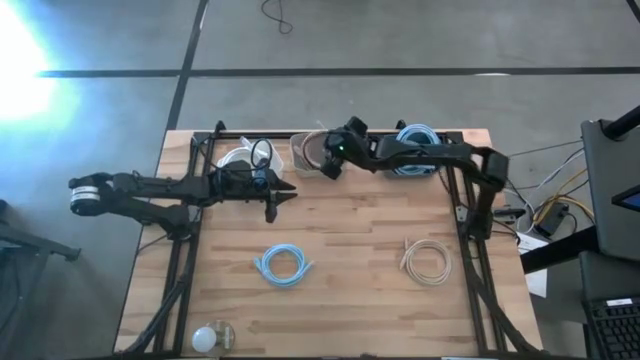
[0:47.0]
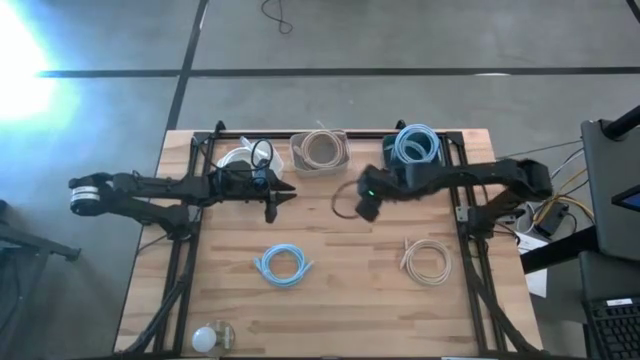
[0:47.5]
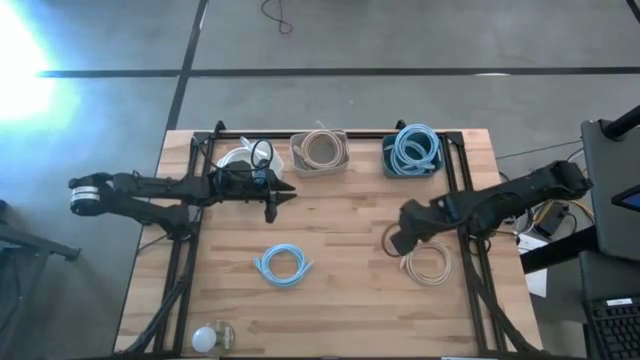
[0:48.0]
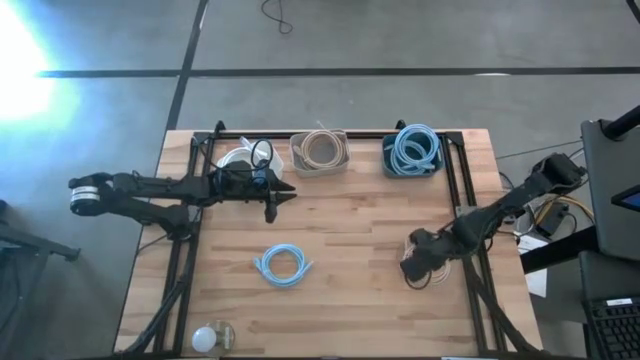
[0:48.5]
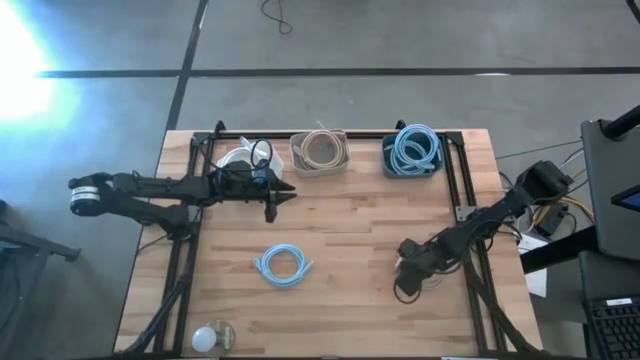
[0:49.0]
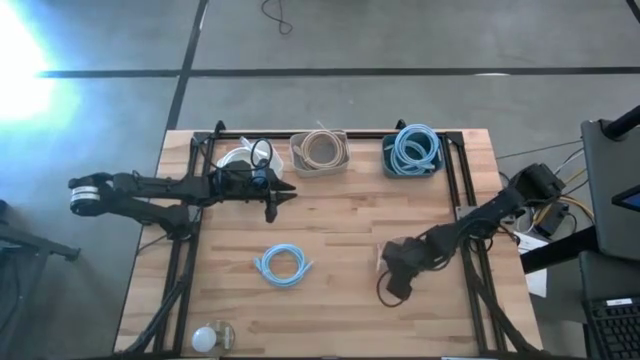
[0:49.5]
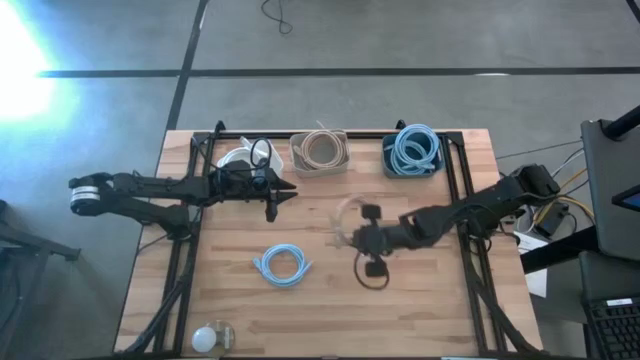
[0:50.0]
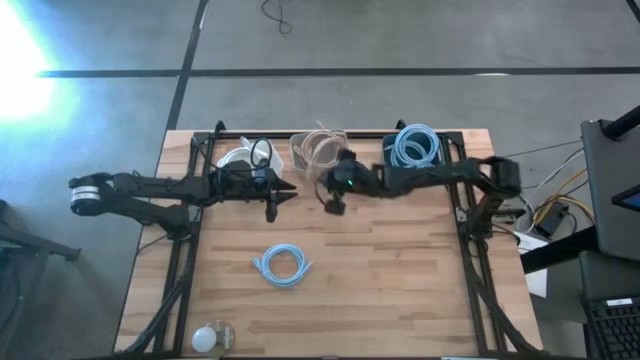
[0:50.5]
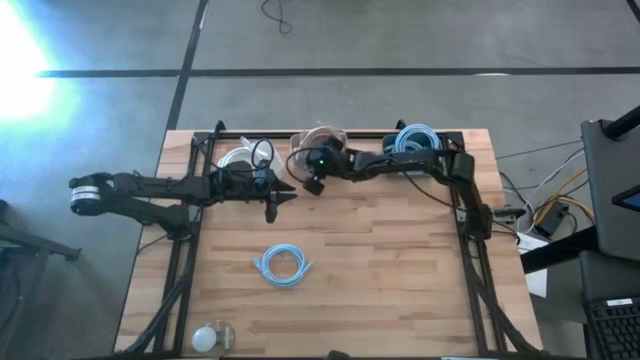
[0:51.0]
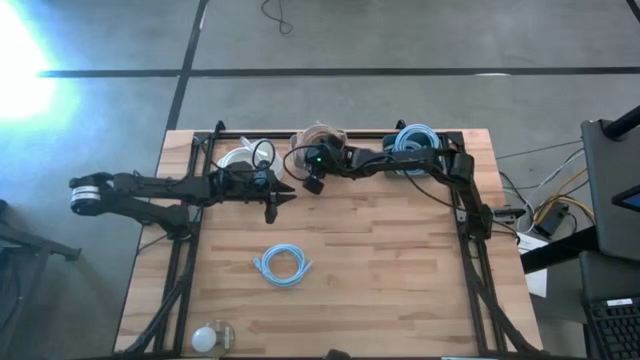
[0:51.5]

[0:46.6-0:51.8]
Task: Sort HDMI cables
Put the light brown HDMI cable into the gray bin

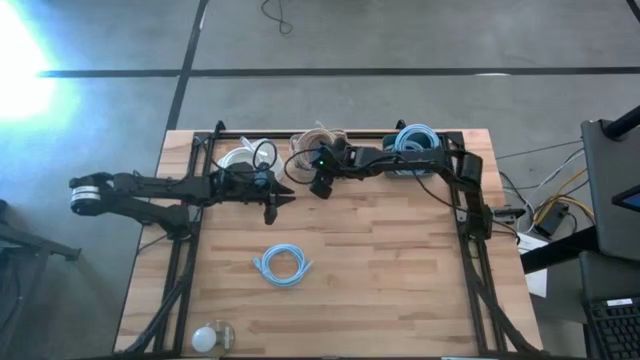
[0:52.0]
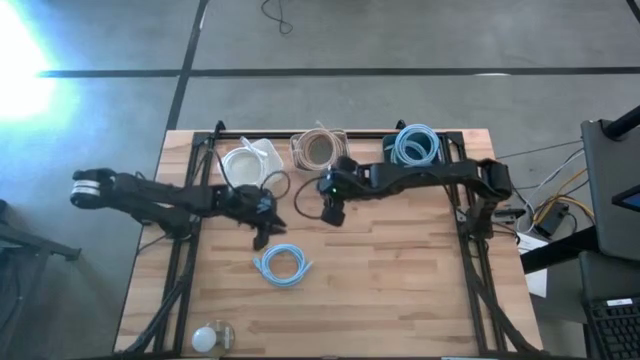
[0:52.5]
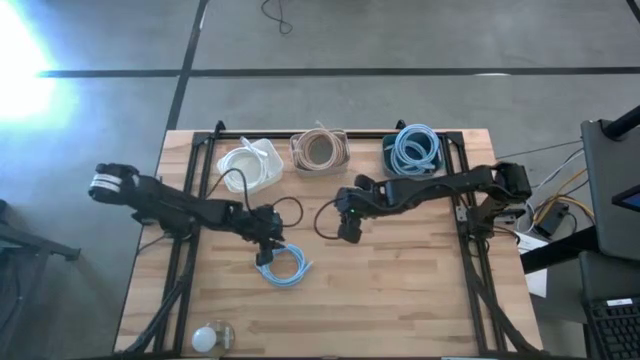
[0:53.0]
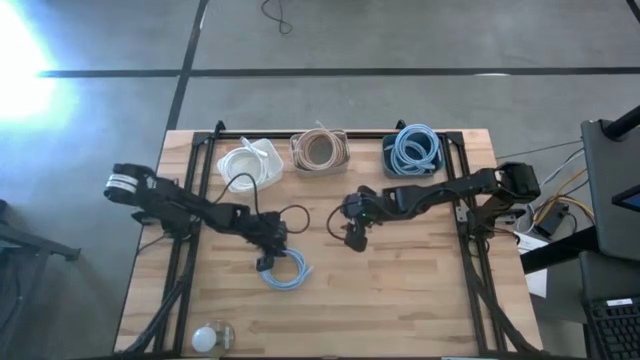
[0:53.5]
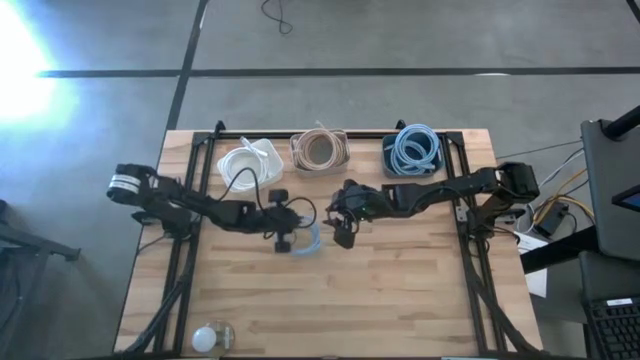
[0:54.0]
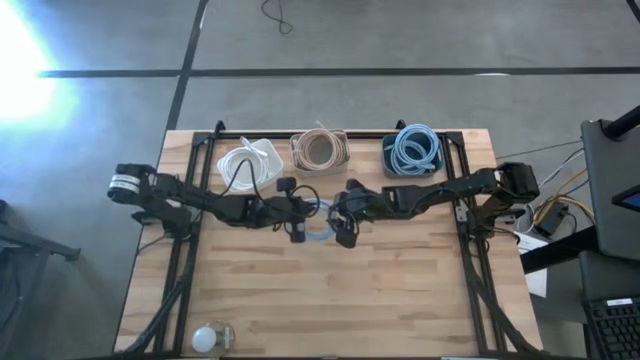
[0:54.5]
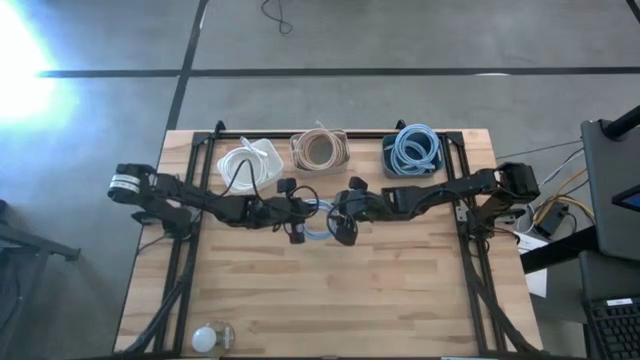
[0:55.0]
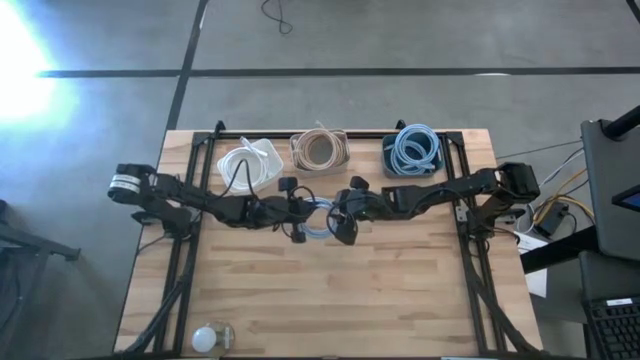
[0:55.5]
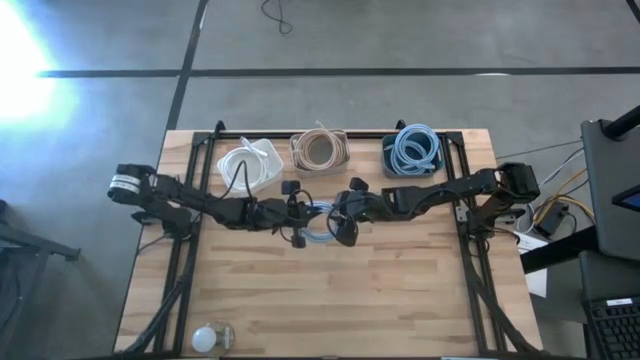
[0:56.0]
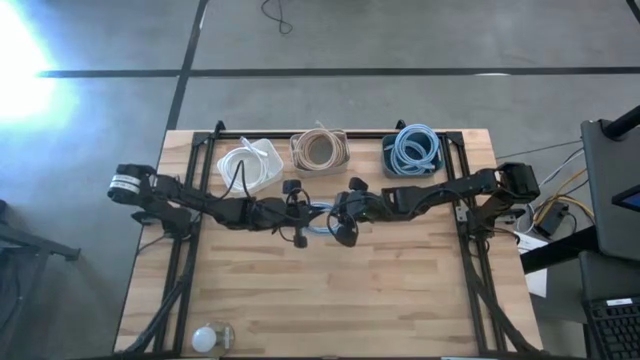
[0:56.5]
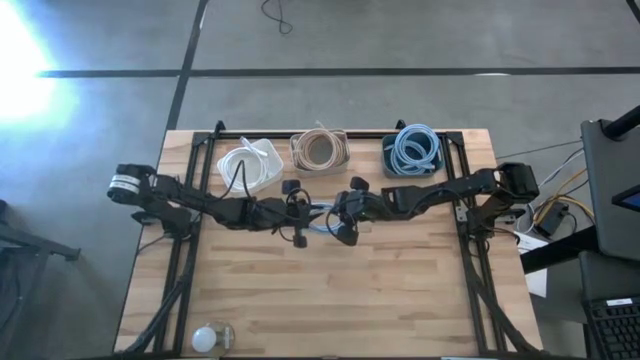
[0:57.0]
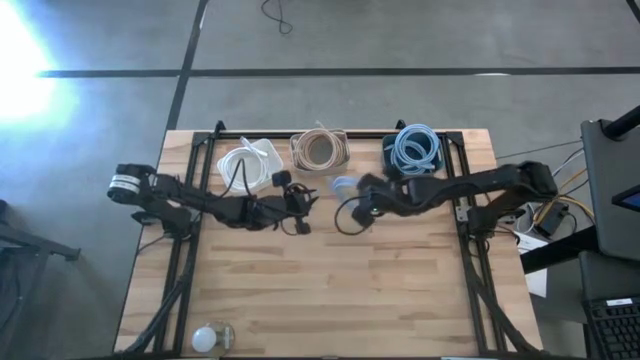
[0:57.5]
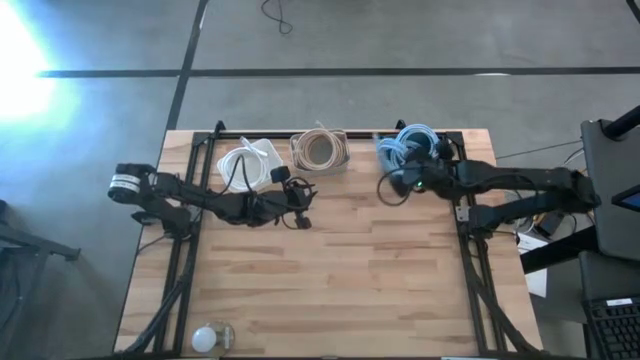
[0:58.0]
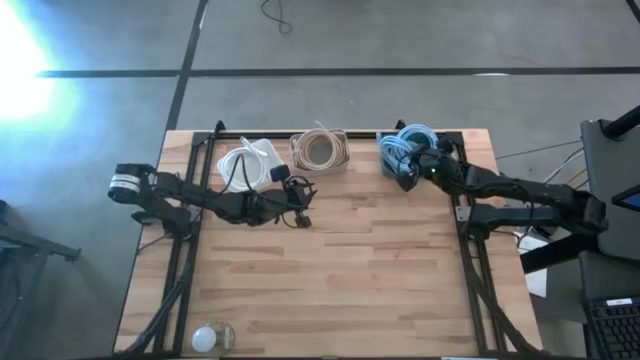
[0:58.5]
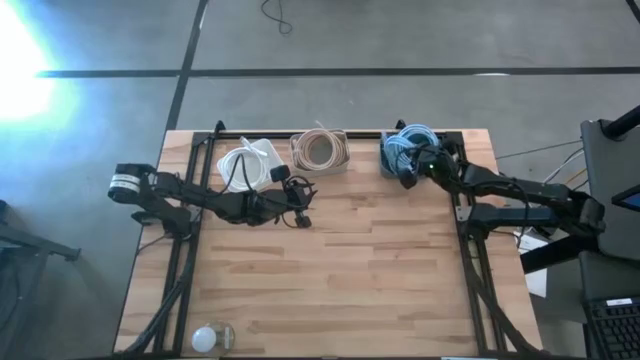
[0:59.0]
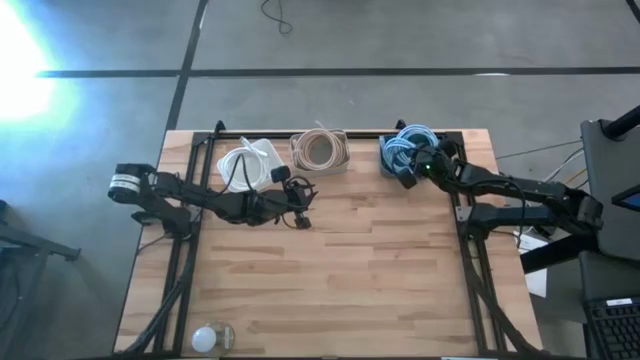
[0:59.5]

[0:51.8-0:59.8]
Put the light blue HDMI cable into the blue bin

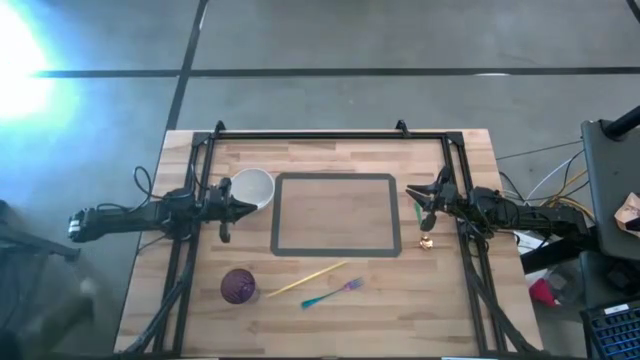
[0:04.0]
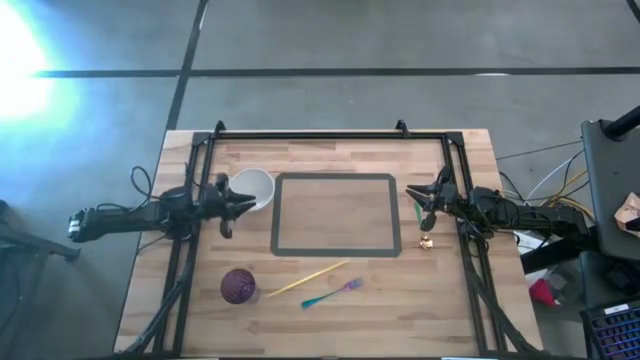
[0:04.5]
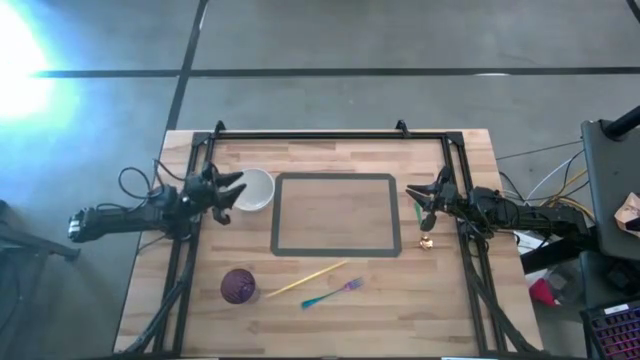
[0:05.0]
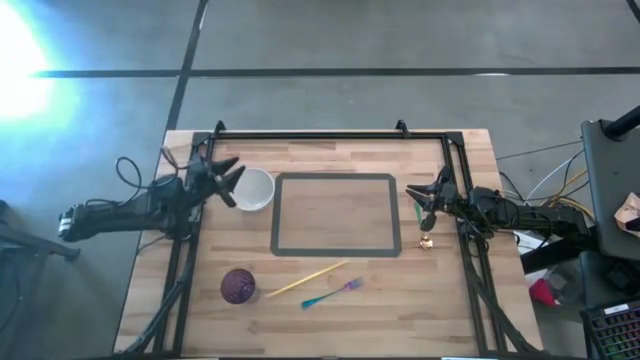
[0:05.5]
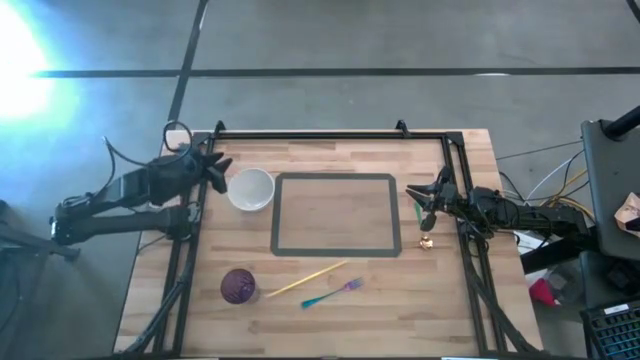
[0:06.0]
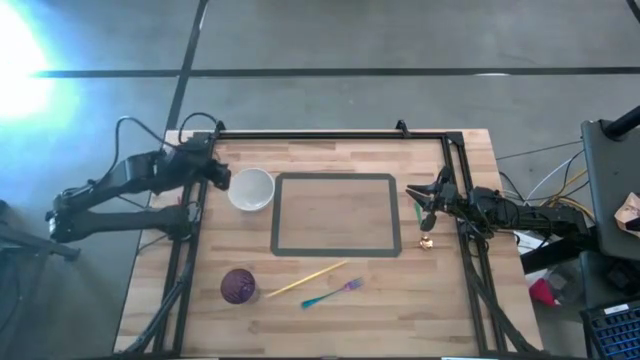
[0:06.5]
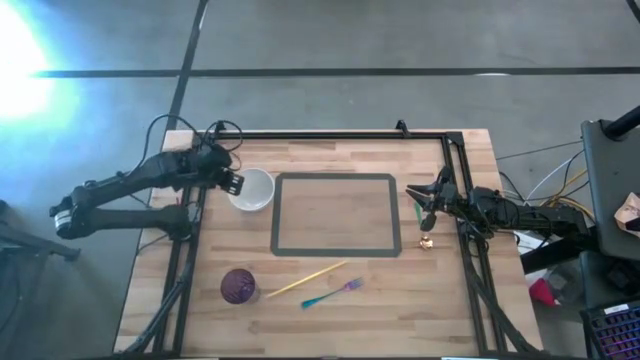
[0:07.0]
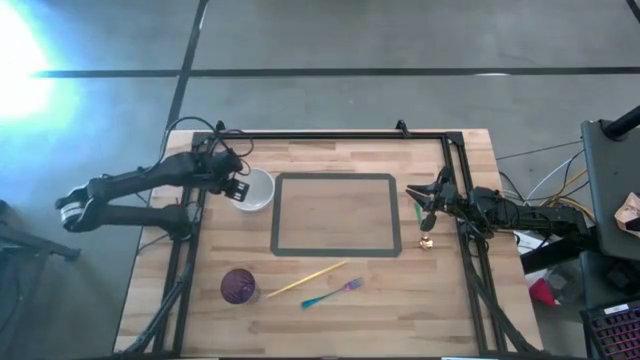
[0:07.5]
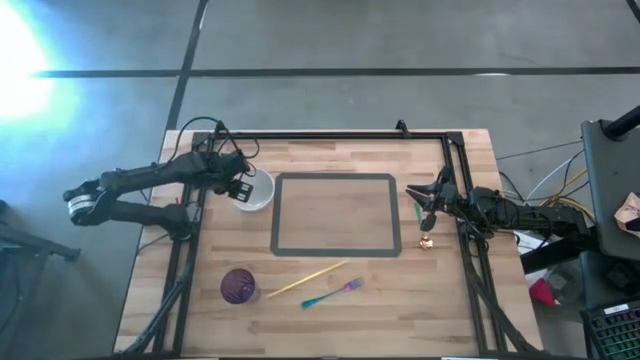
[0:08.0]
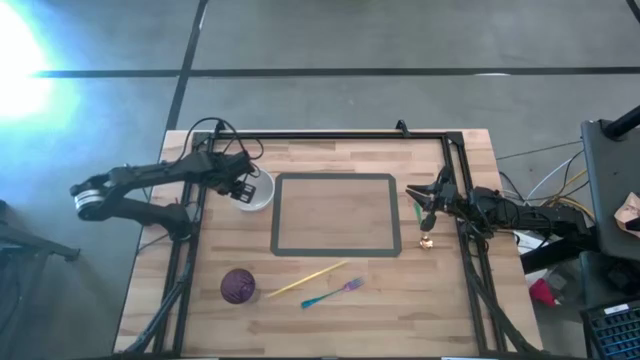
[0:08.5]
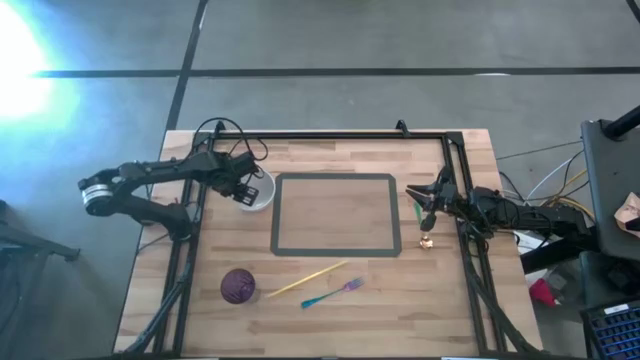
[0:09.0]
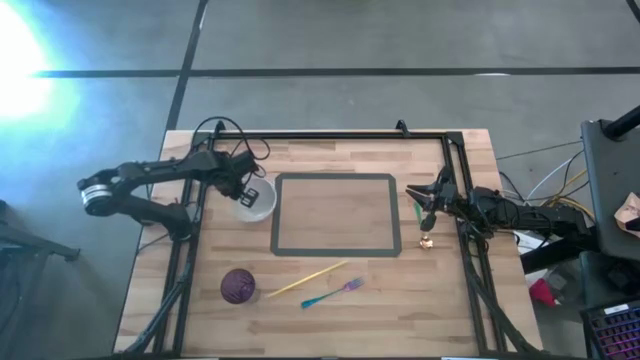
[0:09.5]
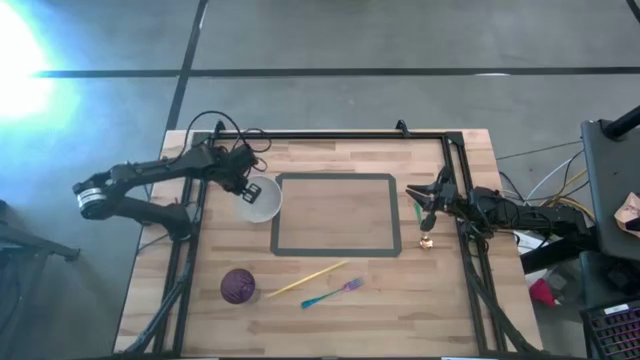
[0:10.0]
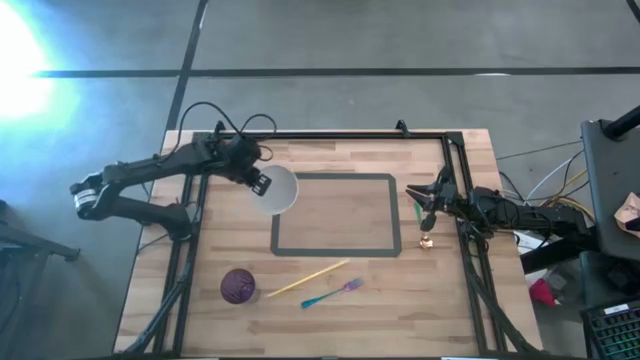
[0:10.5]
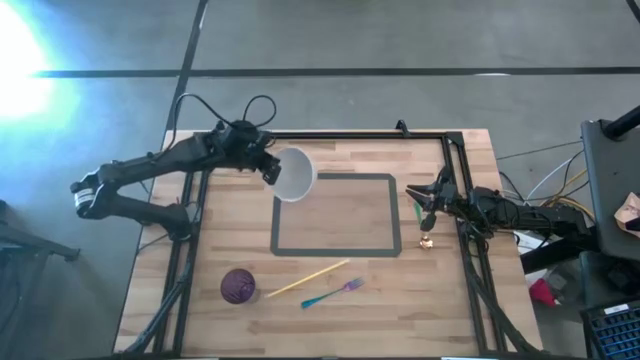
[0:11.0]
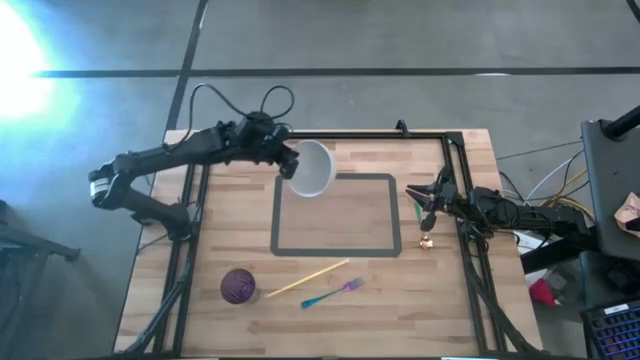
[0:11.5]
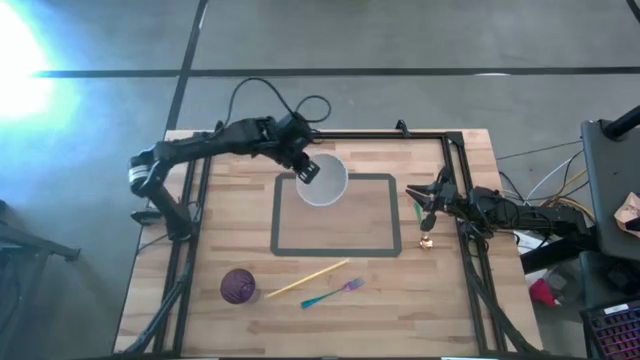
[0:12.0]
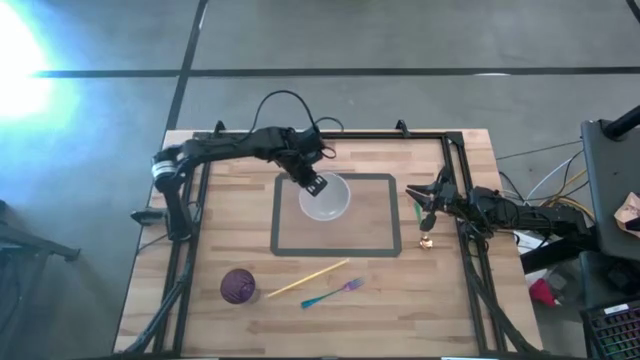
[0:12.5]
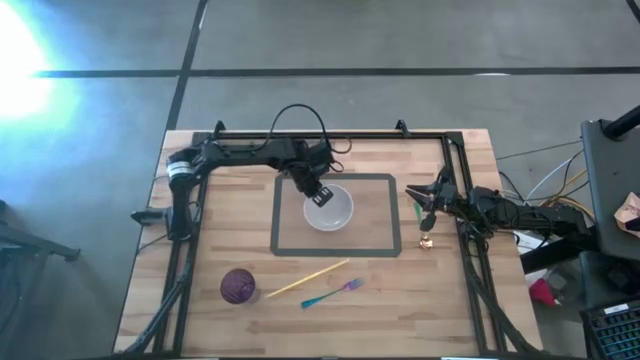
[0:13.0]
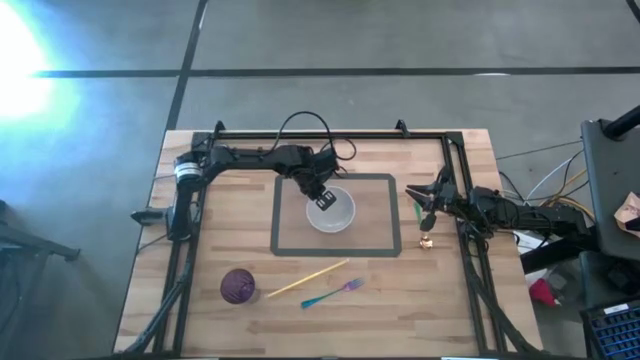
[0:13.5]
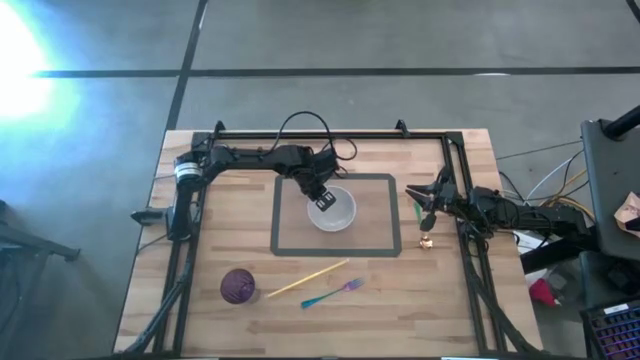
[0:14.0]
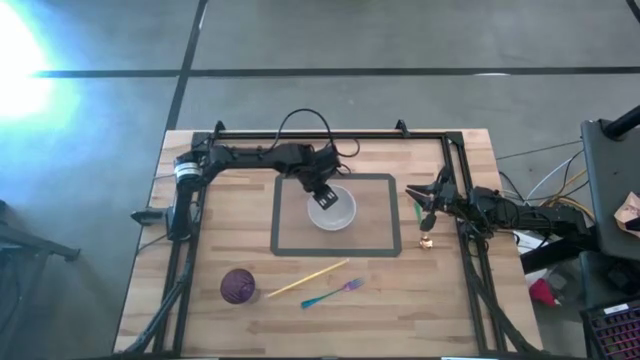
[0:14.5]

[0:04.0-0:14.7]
Task: Pick & Place Utensil
Put the white bowl in the center of the brown placemat
